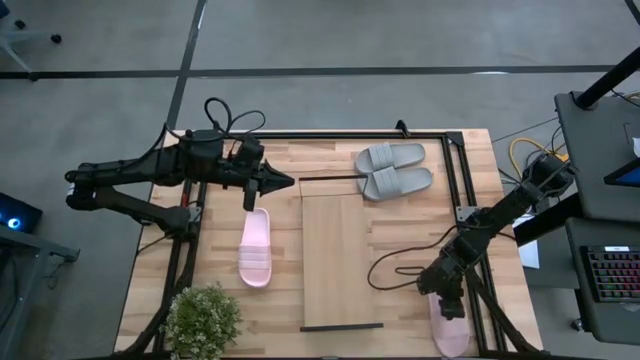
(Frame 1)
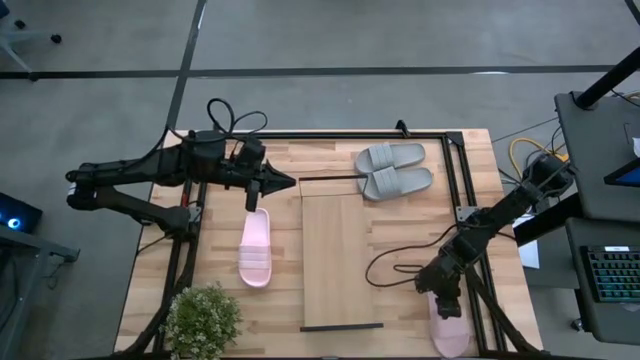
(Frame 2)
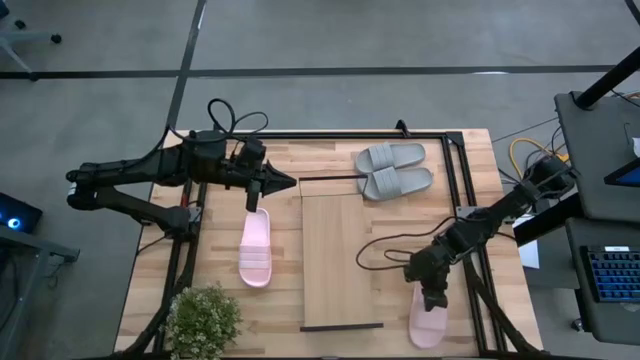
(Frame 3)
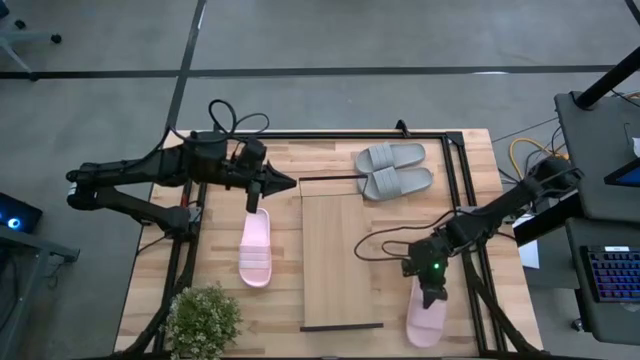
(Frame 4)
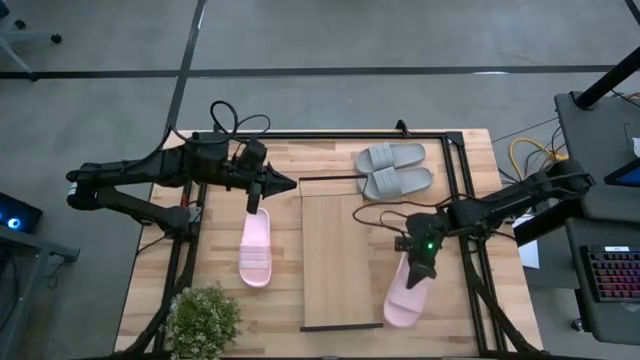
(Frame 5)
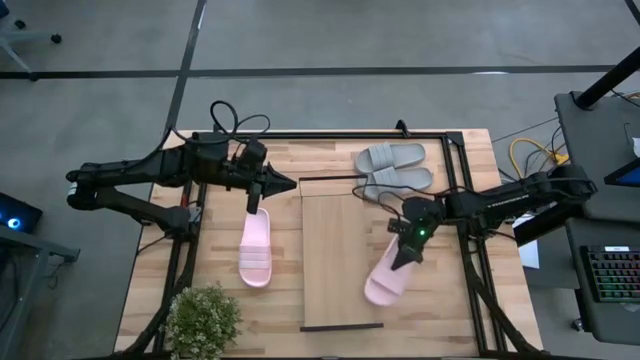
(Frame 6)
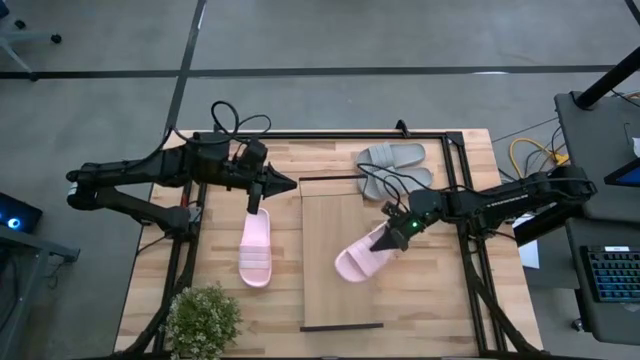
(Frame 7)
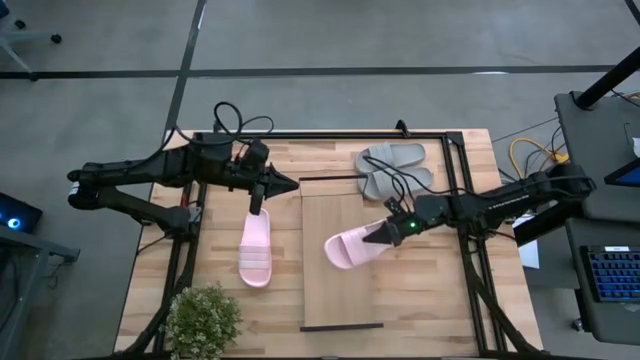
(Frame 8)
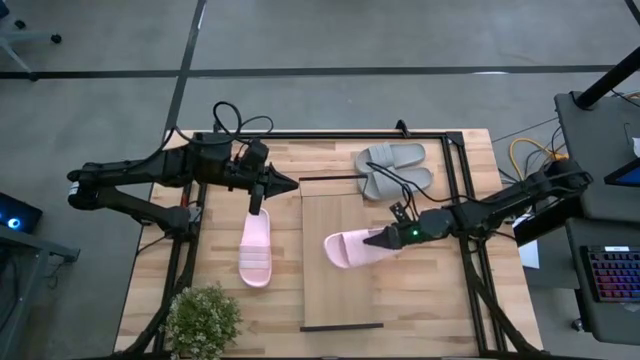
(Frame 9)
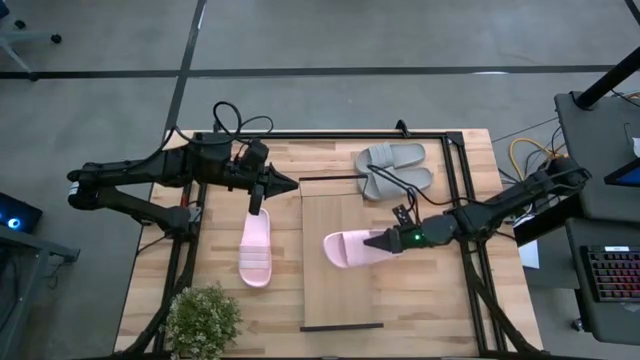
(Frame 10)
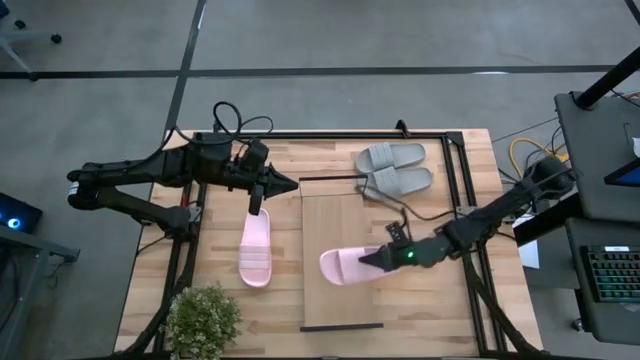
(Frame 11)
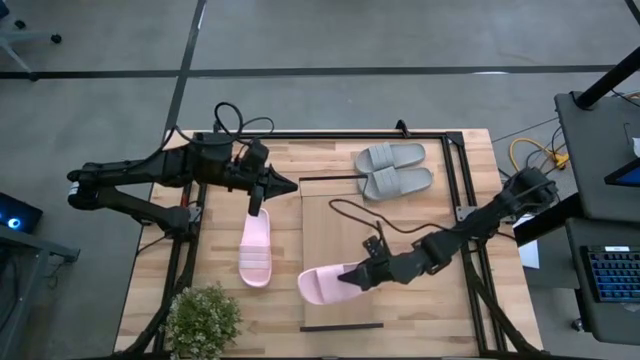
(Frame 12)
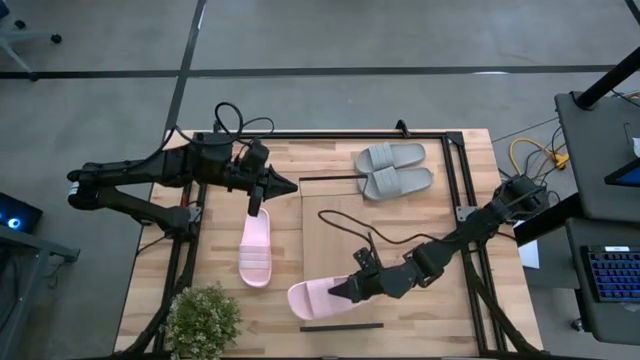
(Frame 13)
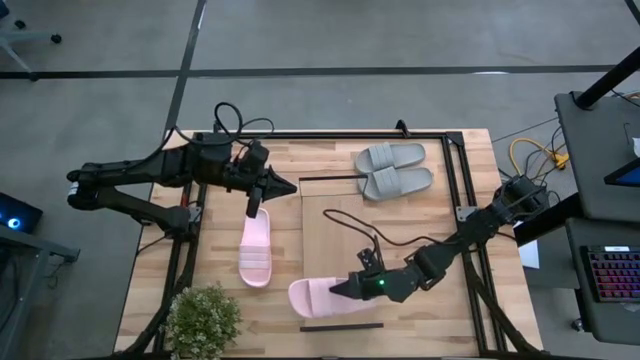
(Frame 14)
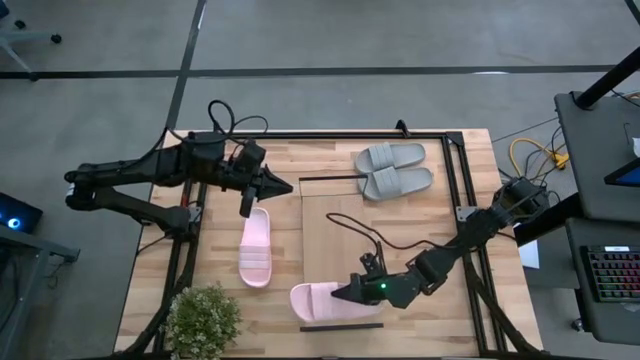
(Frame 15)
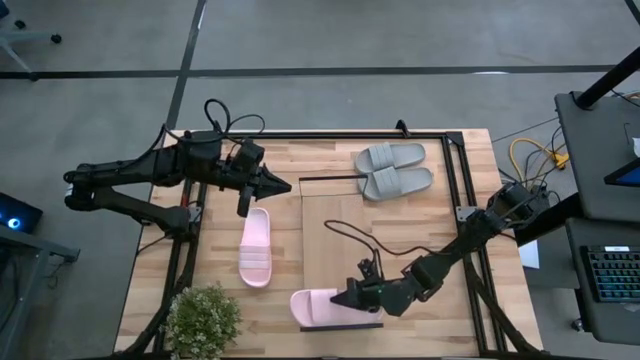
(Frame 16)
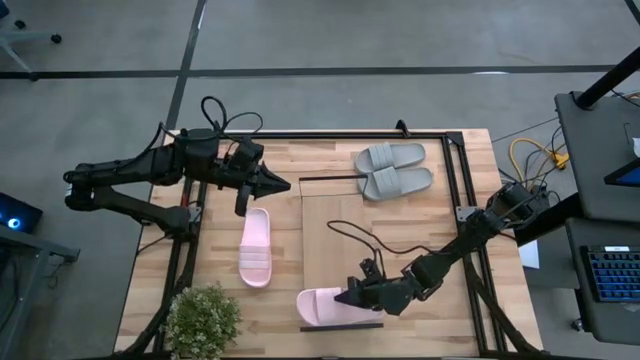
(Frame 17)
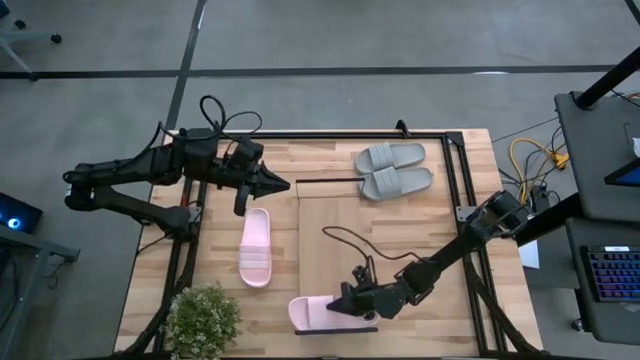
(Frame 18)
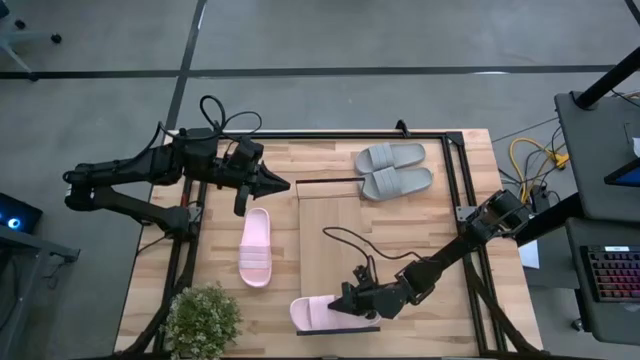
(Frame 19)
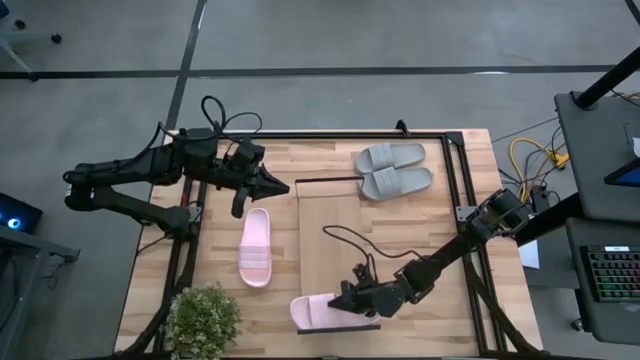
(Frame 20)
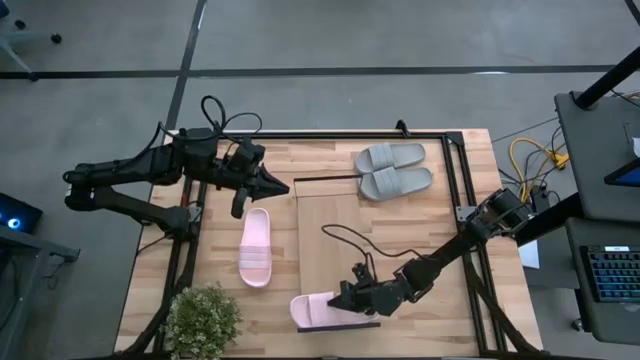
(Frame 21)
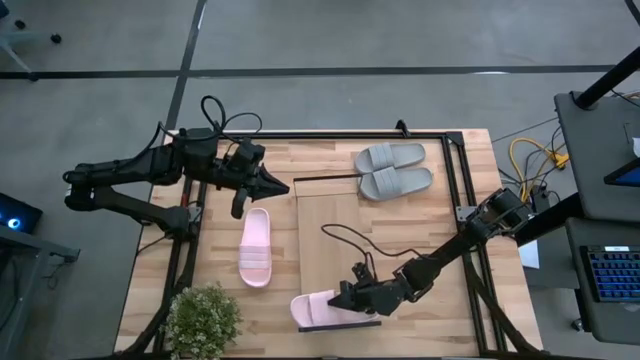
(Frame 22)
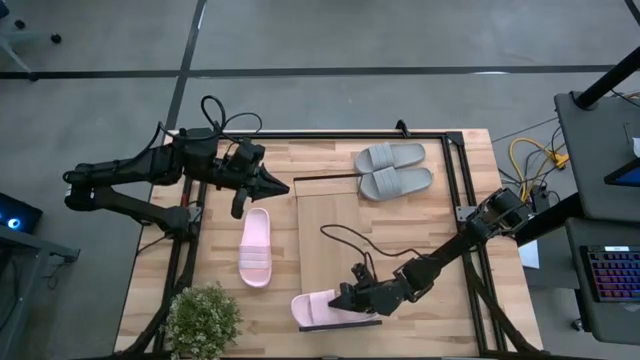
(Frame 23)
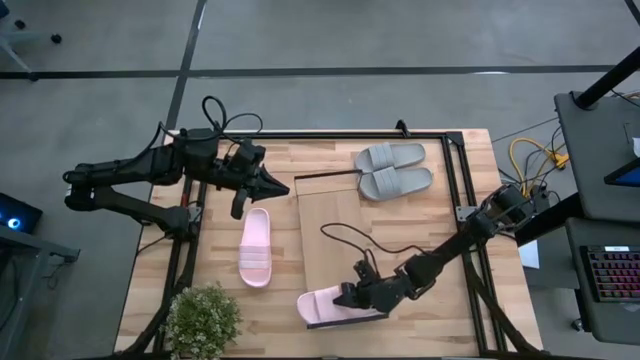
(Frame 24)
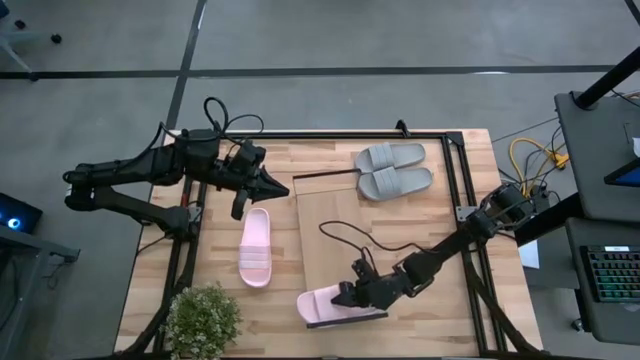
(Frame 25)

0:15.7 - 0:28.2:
Task: Pick and place slides into the shelf
Put the right pink slide on the shelf

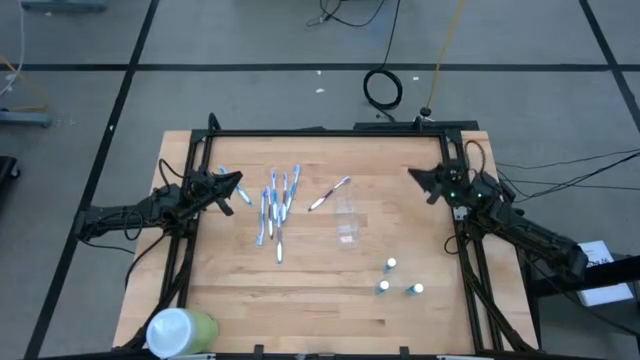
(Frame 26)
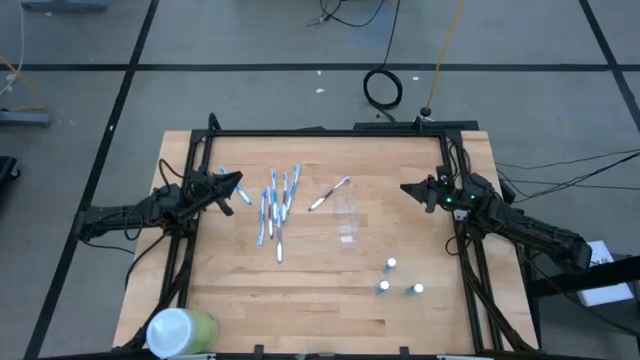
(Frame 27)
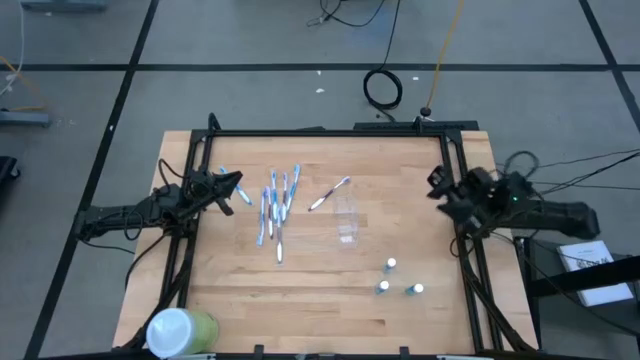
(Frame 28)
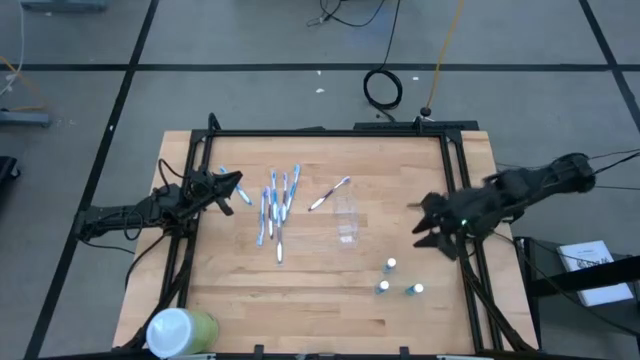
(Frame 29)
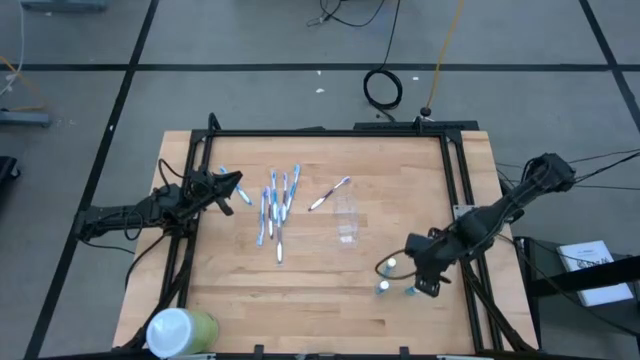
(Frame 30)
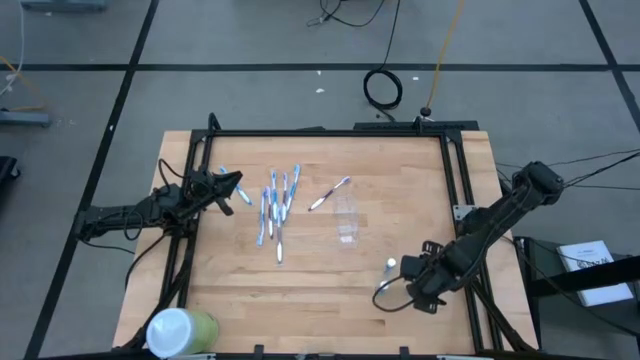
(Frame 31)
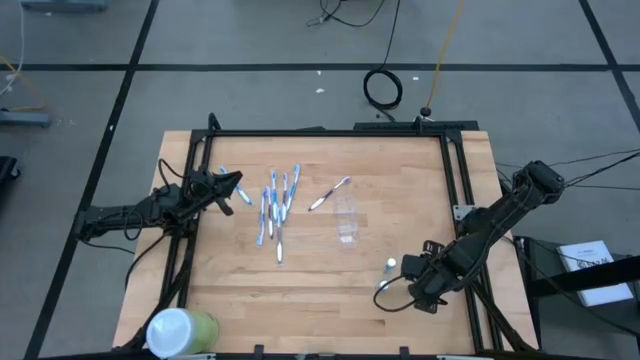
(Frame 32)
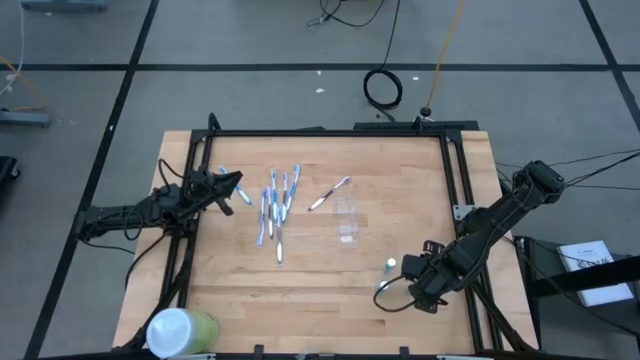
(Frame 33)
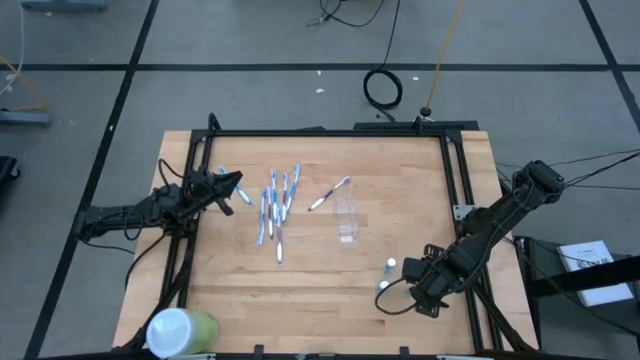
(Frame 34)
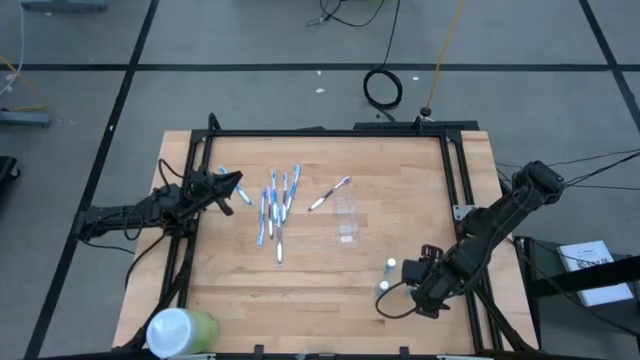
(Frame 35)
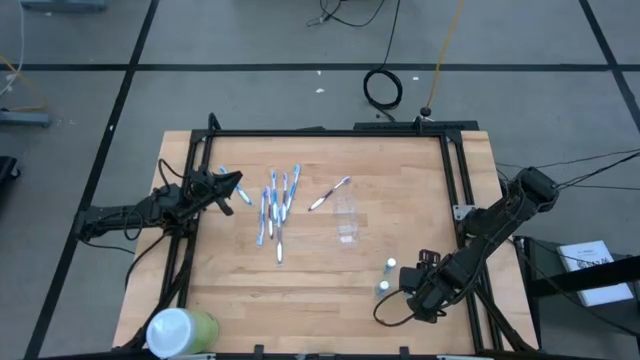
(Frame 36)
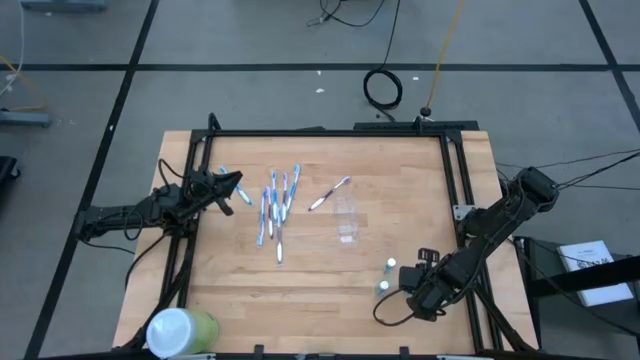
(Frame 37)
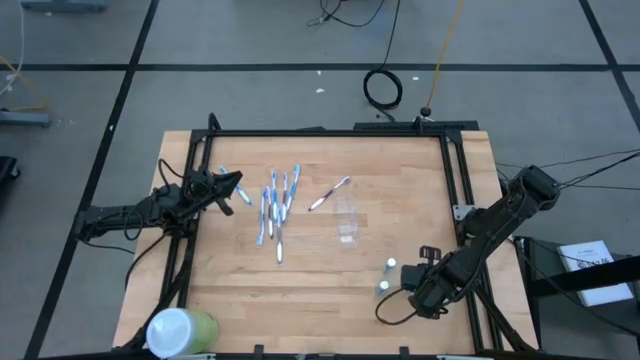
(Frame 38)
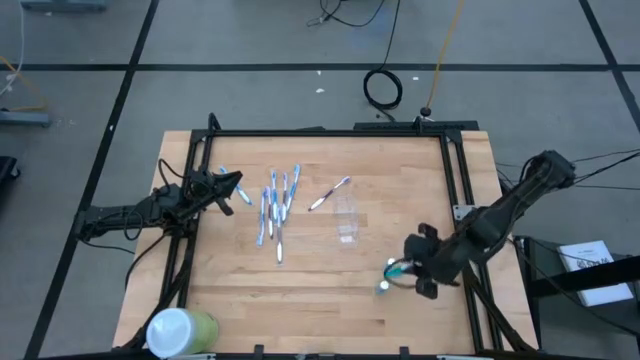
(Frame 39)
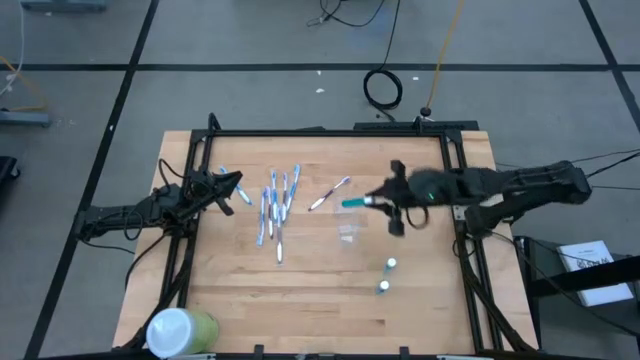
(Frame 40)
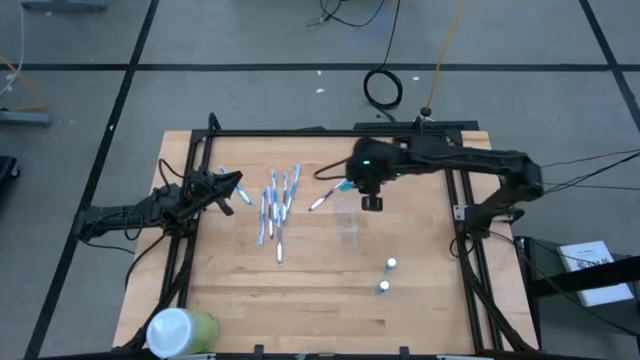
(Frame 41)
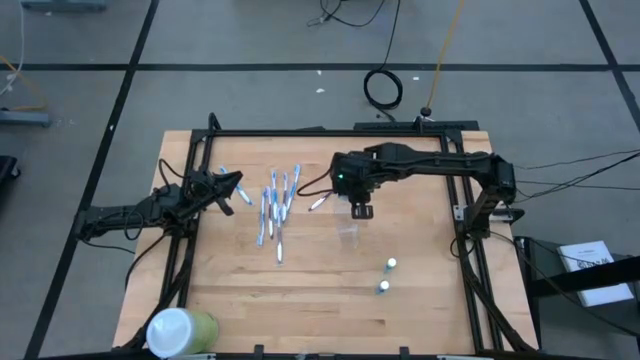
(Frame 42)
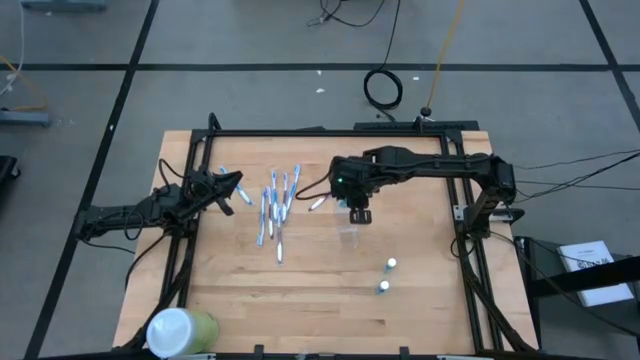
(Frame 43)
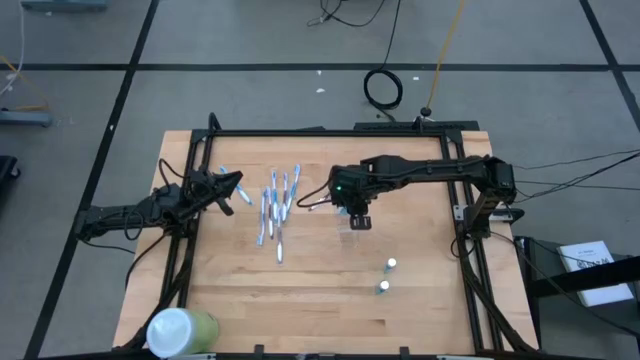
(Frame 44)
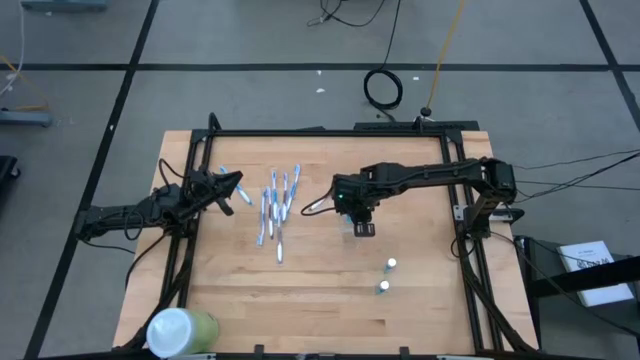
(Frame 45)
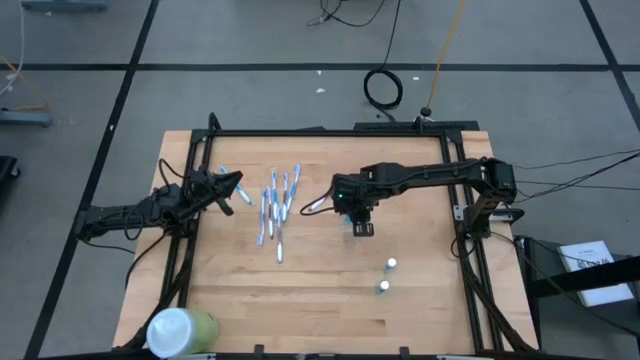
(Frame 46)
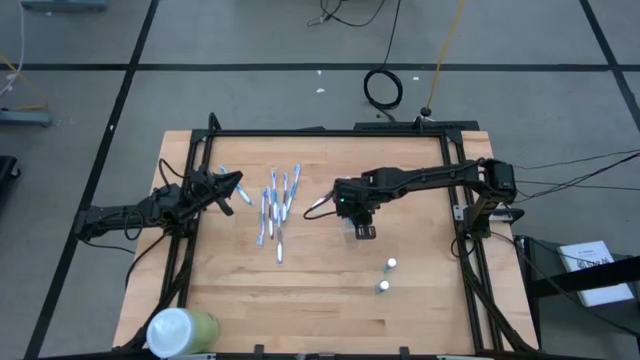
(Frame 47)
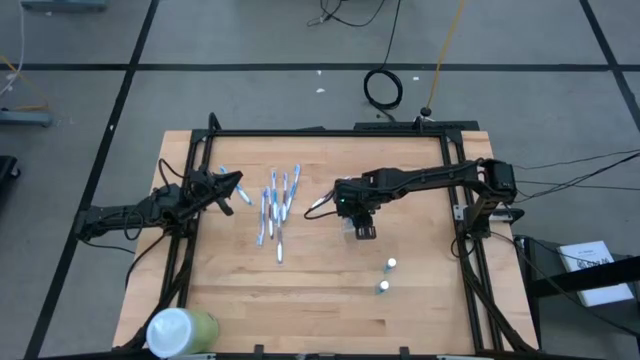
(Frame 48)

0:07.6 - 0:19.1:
Task: Pick & Place toothbrushing station
Put the blue mouthwash into the transparent organizer
